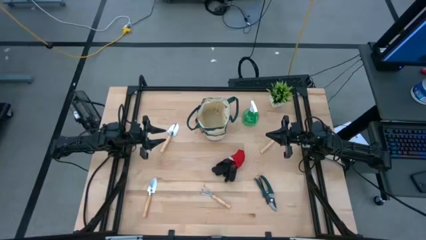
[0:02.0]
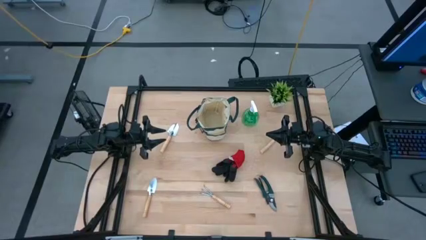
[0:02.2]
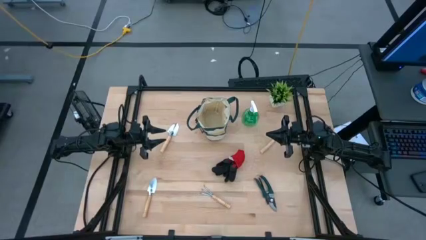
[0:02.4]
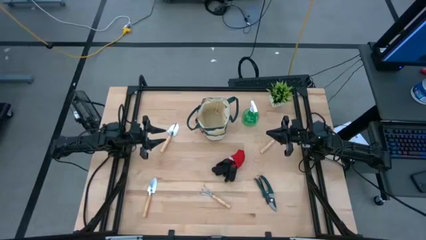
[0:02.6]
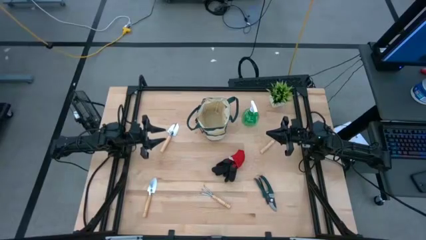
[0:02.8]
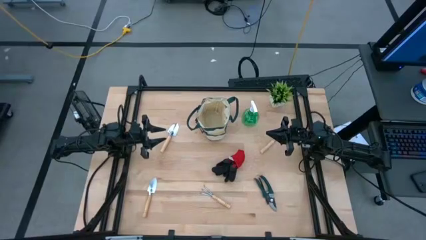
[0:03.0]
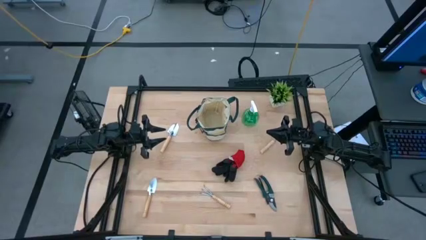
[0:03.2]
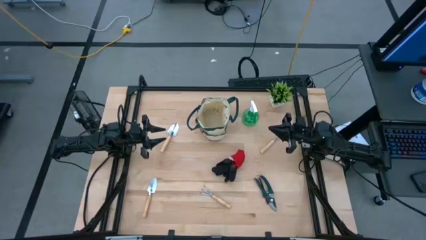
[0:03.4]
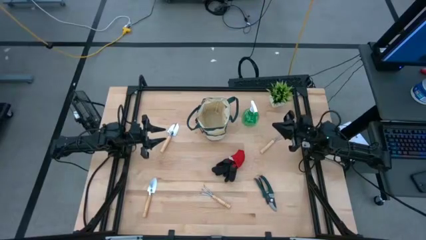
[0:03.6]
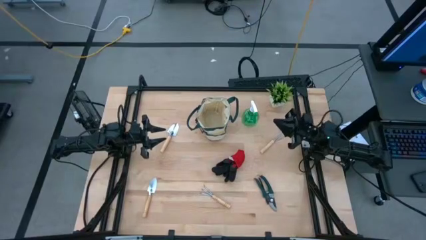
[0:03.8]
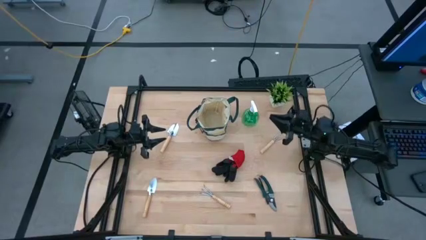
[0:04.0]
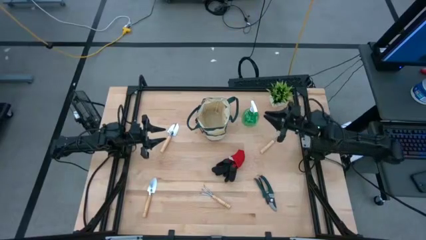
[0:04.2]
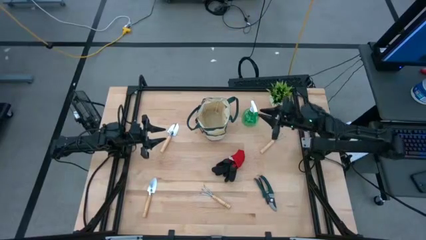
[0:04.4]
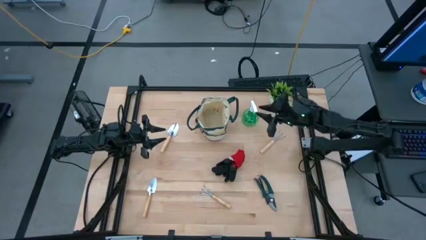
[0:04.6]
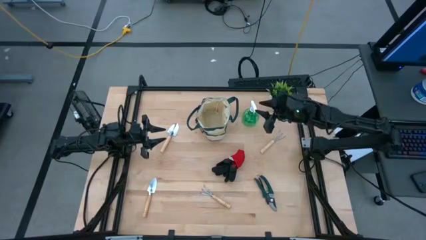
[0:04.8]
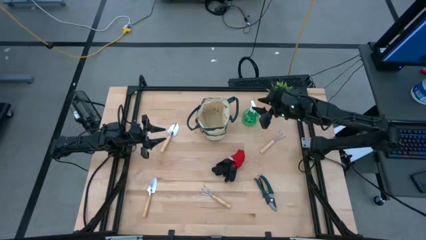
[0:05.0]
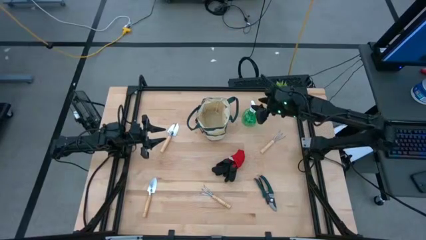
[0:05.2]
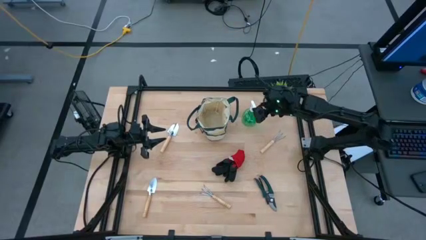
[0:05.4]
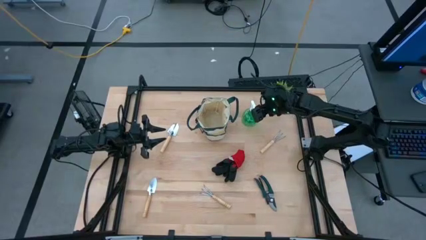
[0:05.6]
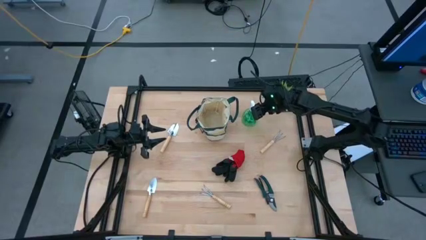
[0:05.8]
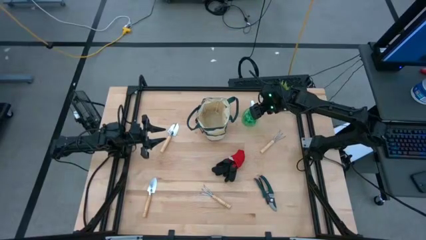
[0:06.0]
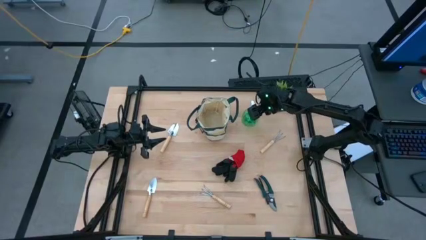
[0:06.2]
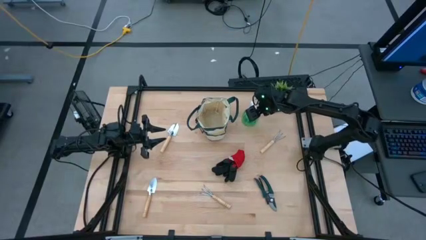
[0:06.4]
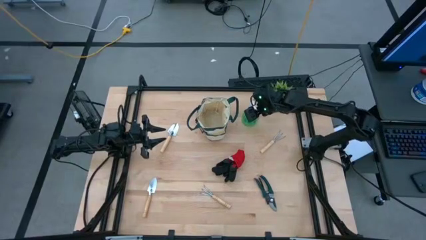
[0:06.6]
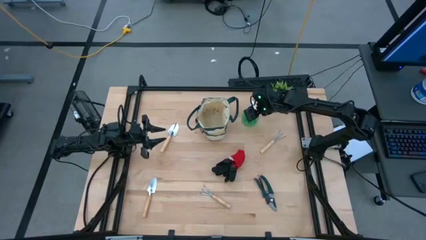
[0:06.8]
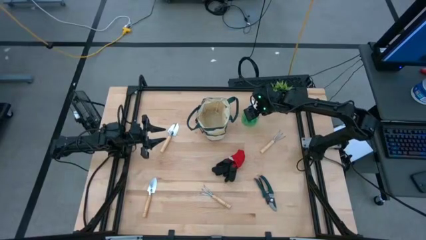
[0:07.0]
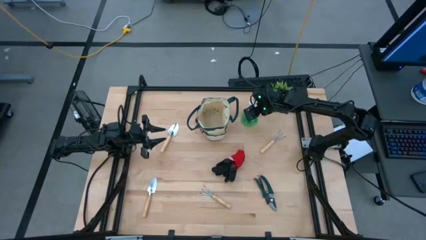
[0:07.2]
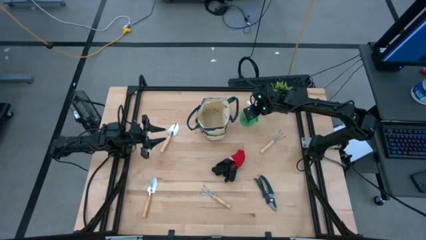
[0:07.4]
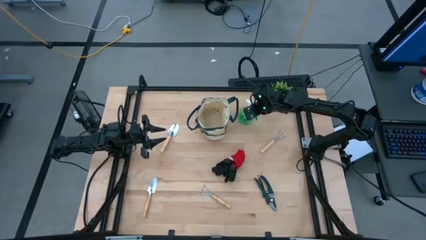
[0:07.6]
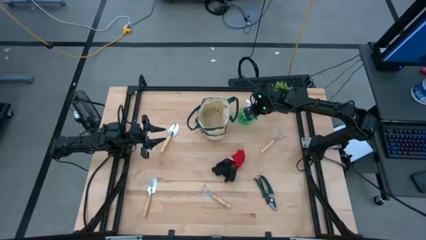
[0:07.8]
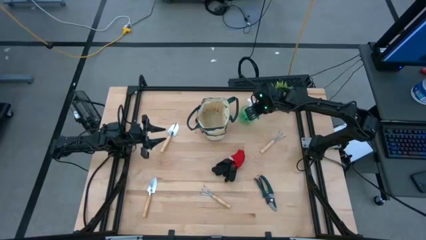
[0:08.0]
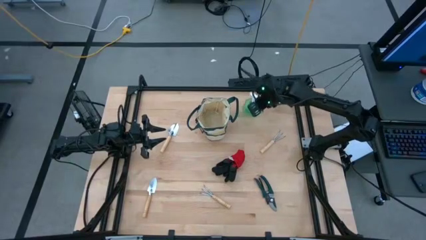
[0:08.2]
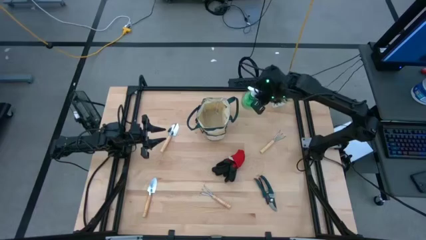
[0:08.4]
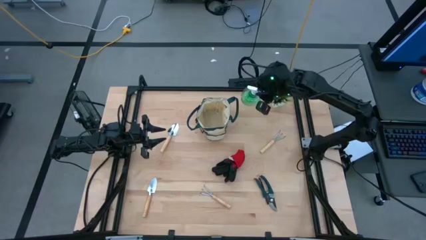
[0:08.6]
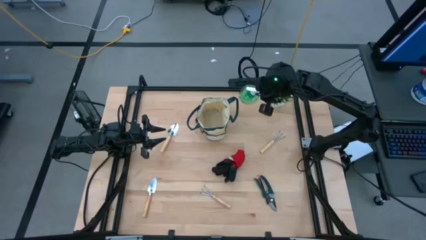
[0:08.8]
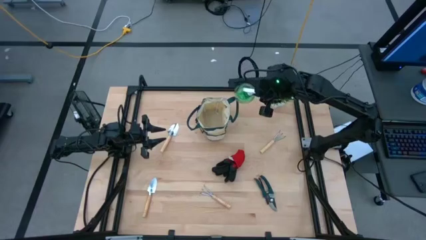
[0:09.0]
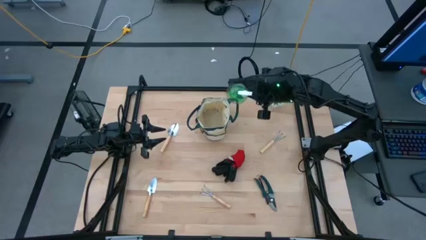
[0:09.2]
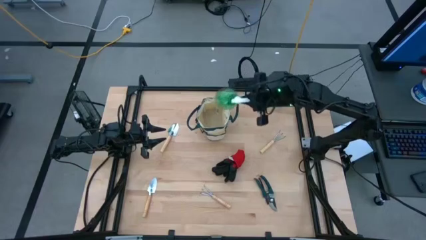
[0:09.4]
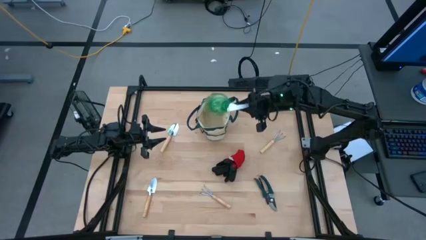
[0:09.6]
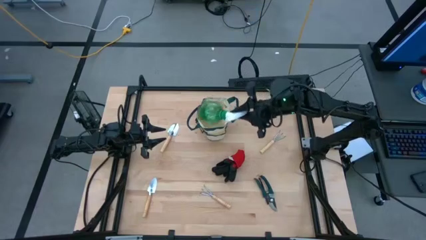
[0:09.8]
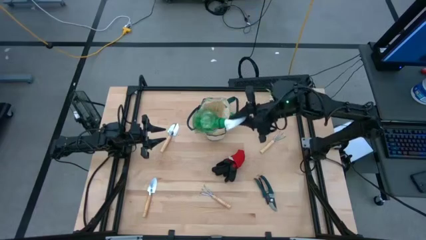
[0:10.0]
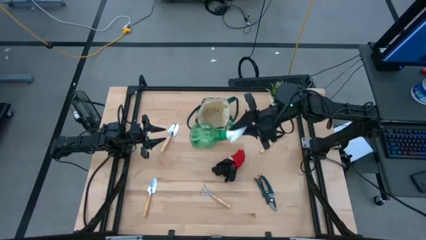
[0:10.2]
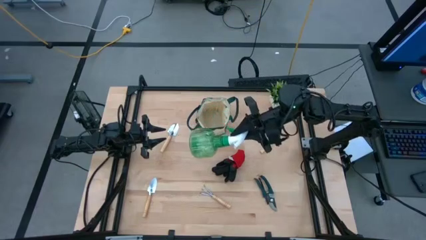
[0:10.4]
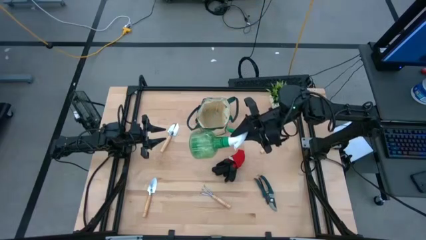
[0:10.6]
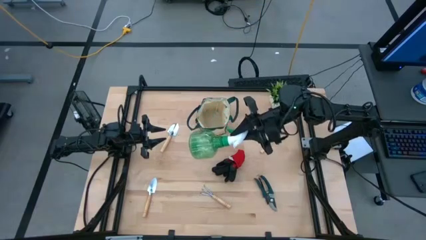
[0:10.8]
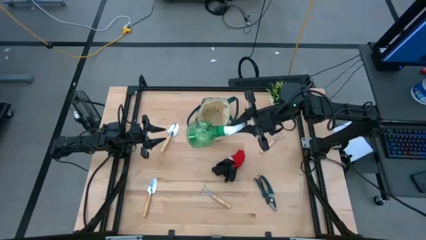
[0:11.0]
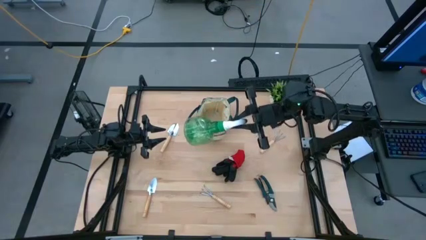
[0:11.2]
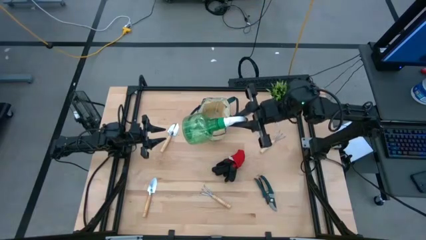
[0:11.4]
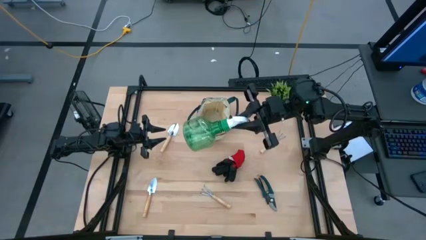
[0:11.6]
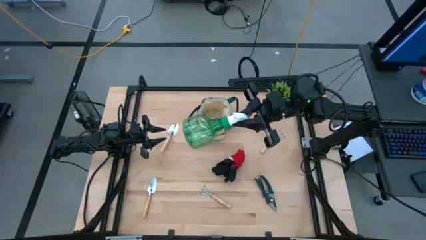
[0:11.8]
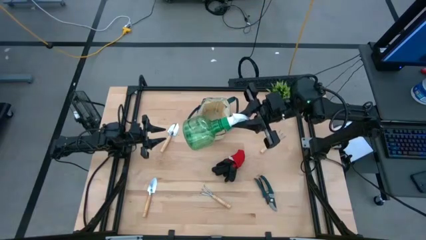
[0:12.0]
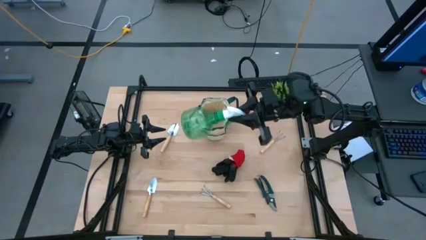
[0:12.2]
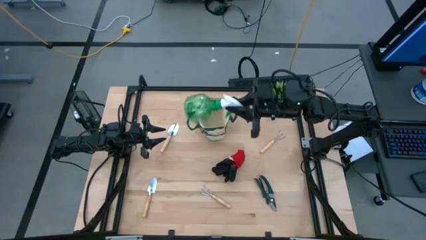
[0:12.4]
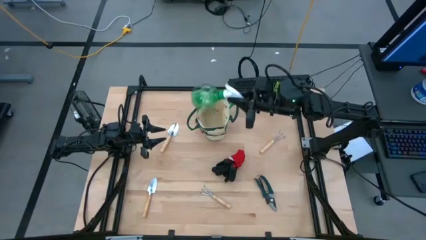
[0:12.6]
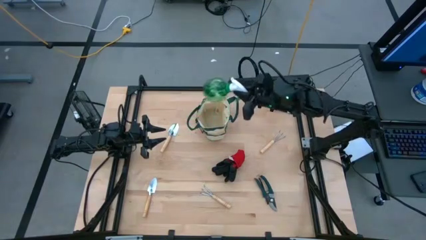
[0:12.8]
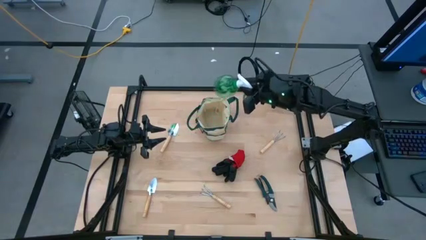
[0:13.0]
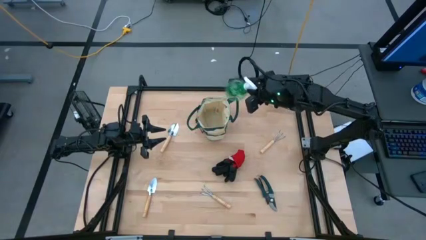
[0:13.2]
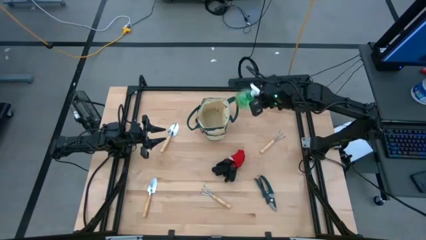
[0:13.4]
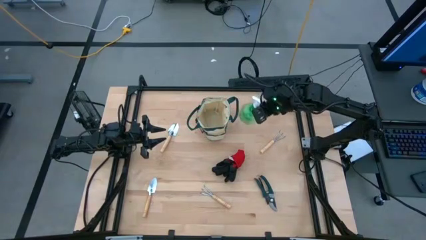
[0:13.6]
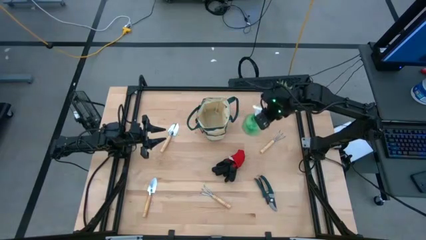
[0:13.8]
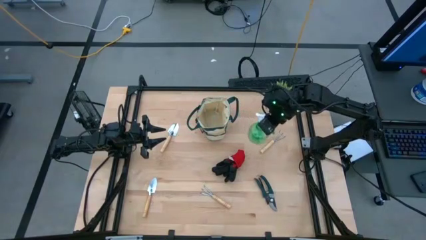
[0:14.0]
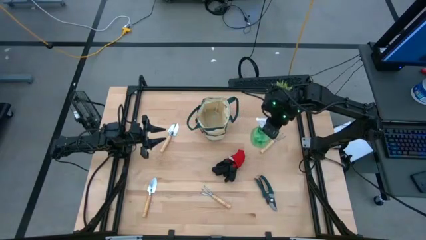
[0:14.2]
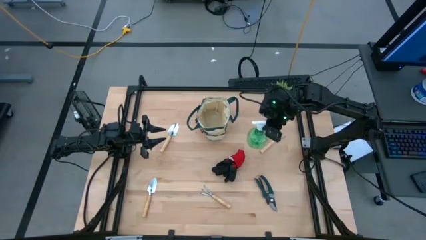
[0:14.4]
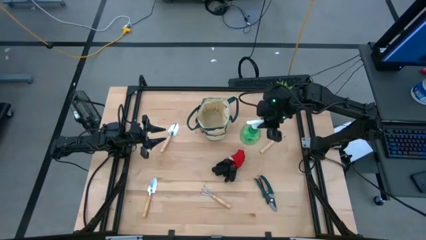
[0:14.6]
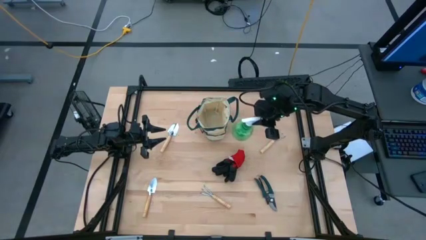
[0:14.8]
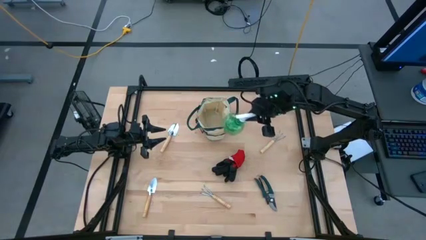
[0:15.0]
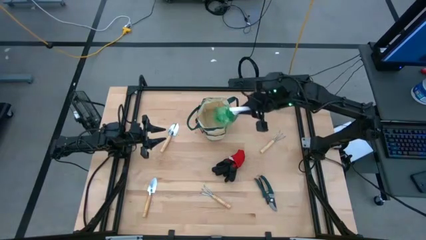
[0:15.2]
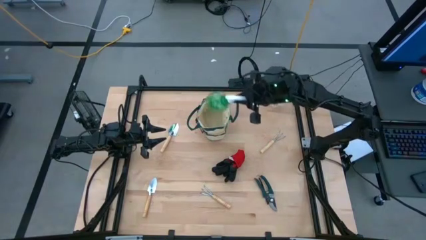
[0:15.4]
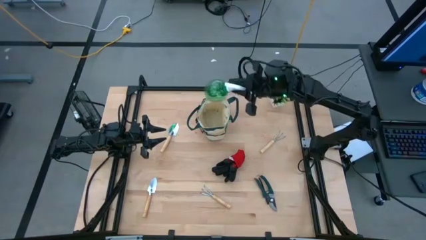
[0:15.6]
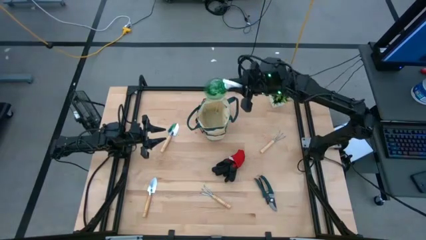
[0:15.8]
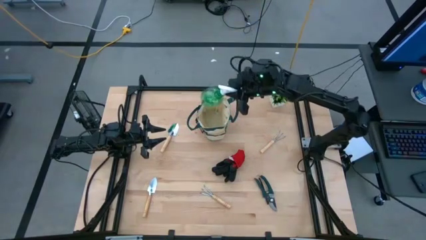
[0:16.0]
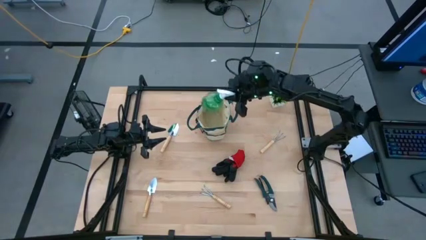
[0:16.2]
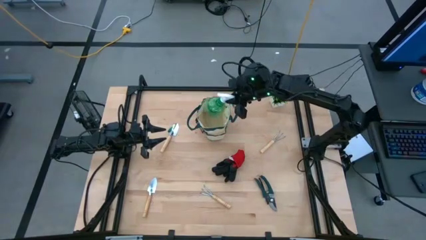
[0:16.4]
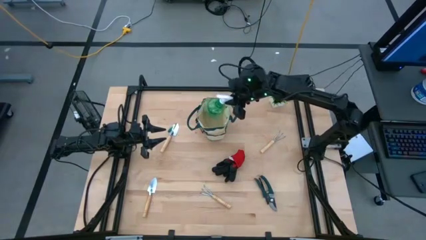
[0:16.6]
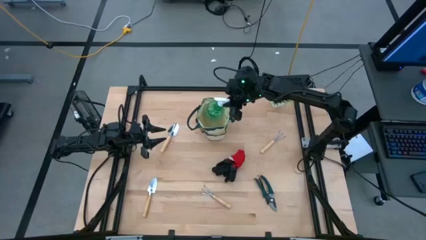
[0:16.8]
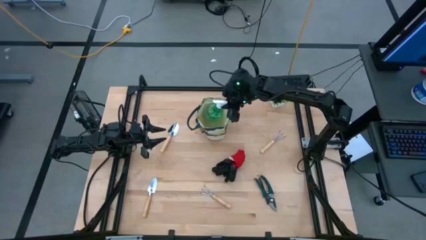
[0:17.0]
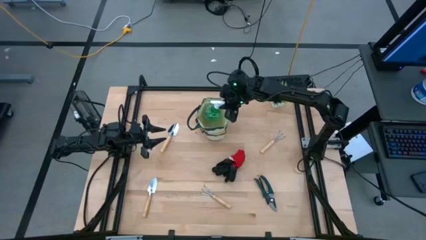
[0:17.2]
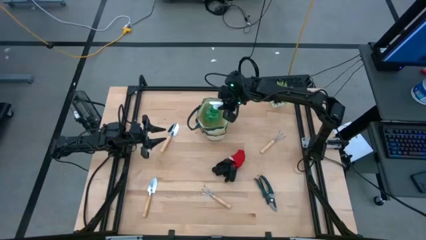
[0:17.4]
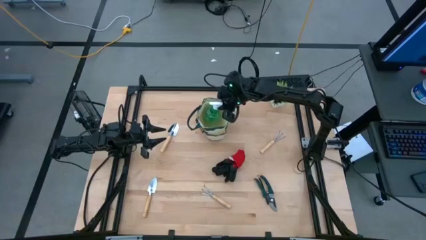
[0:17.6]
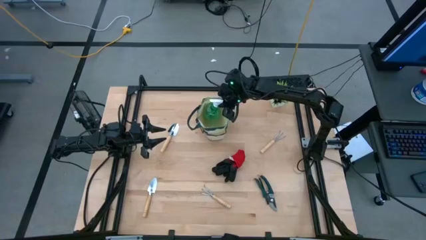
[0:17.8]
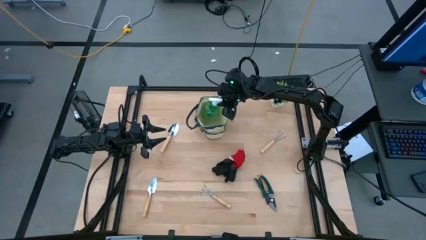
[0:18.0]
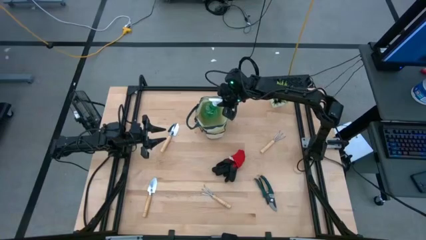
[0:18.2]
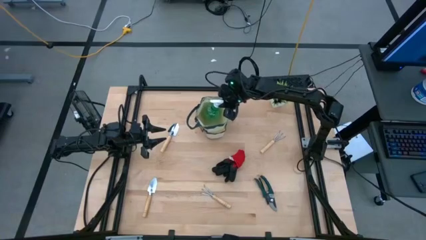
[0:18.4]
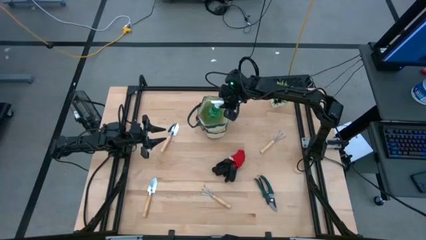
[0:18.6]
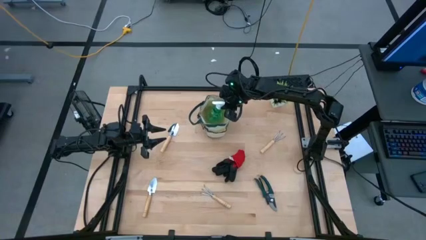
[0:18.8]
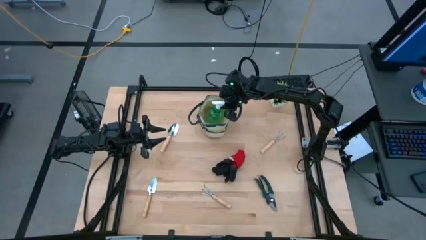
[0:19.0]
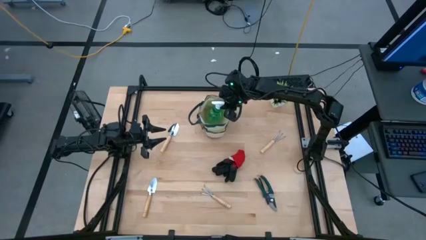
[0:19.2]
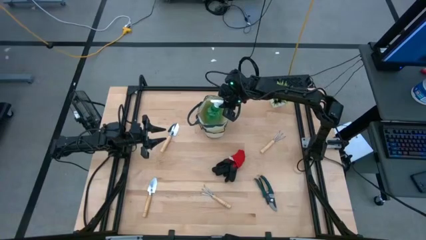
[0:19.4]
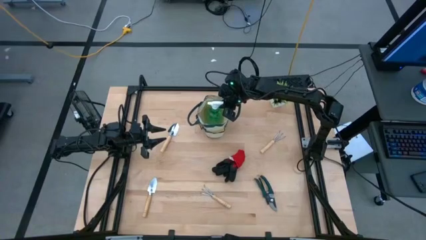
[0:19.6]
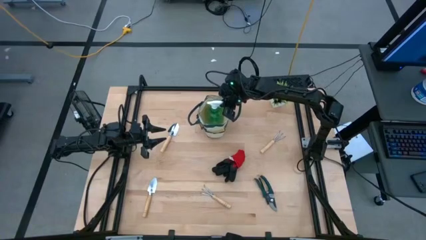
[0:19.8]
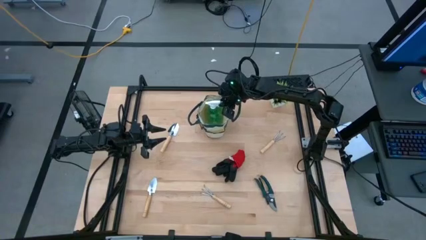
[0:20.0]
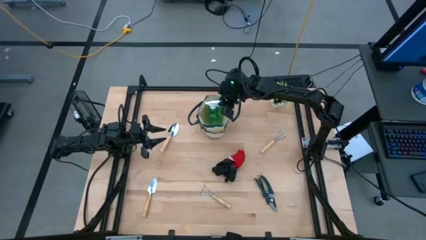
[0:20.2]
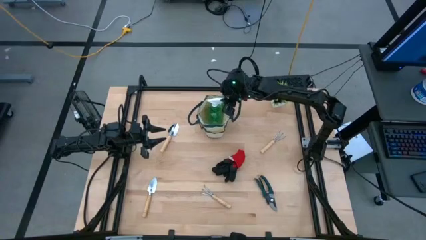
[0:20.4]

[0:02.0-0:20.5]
Task: Pick & Place Garden tools in Gardening bag
Put the green and white spray bottle into the gardening bag
